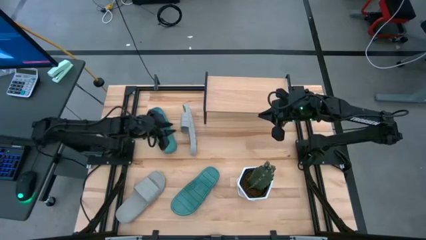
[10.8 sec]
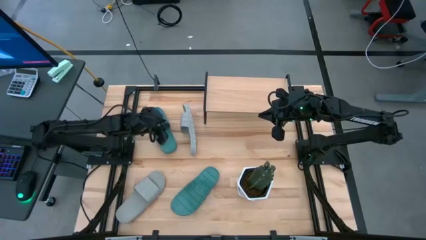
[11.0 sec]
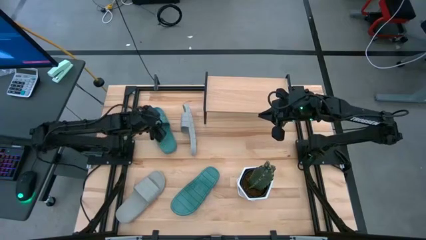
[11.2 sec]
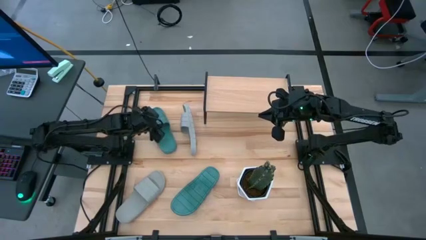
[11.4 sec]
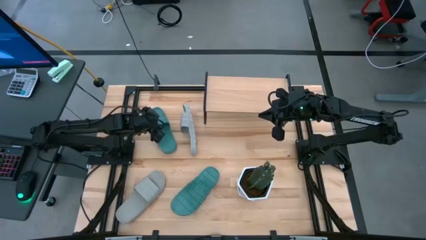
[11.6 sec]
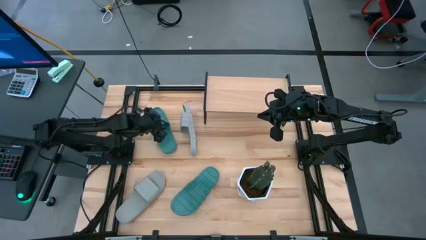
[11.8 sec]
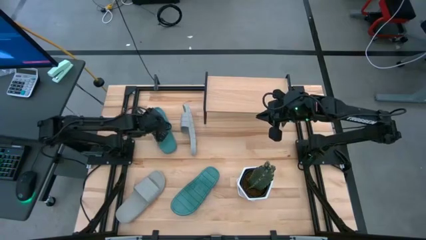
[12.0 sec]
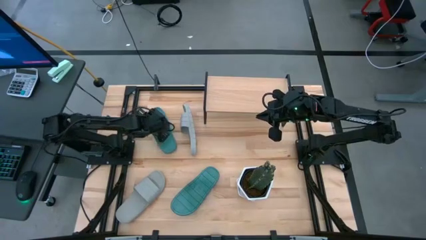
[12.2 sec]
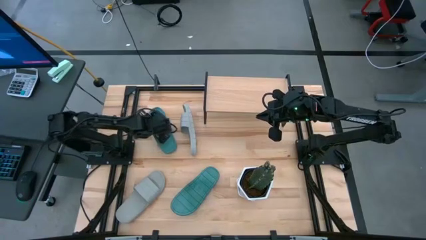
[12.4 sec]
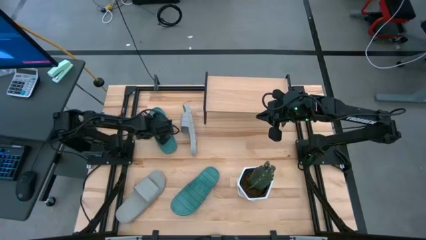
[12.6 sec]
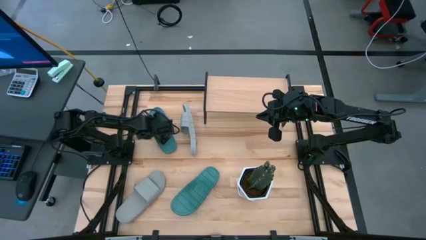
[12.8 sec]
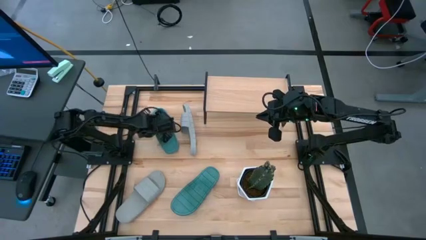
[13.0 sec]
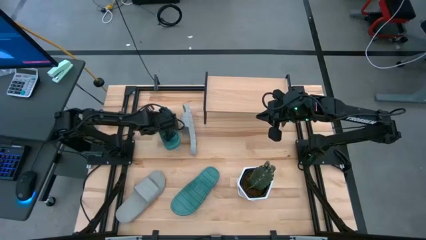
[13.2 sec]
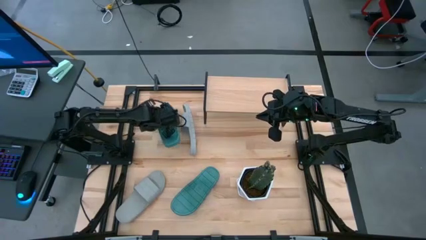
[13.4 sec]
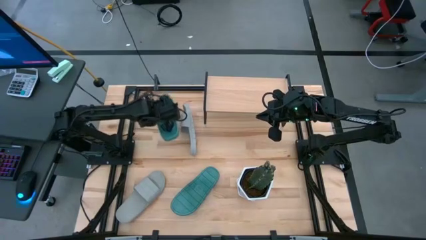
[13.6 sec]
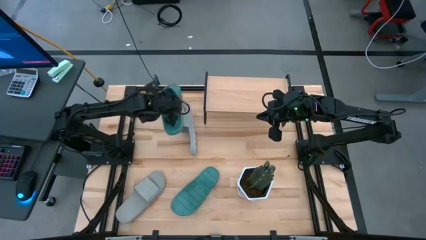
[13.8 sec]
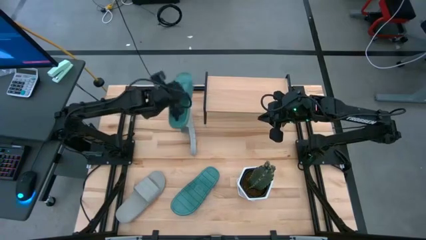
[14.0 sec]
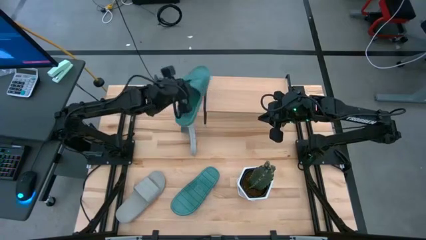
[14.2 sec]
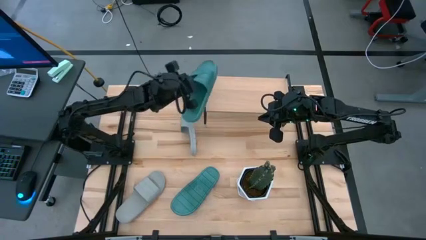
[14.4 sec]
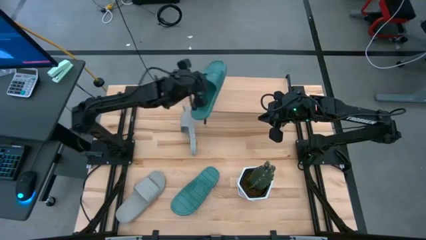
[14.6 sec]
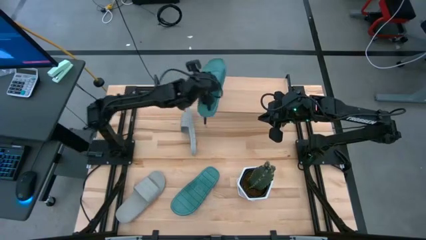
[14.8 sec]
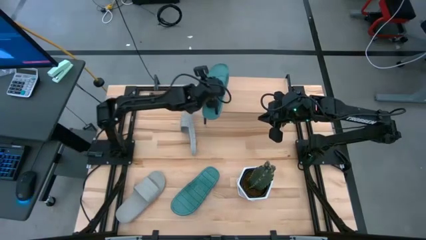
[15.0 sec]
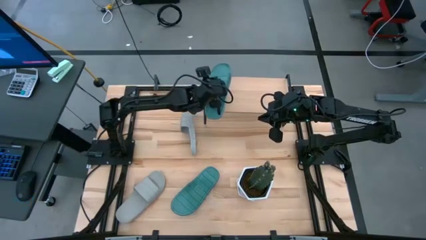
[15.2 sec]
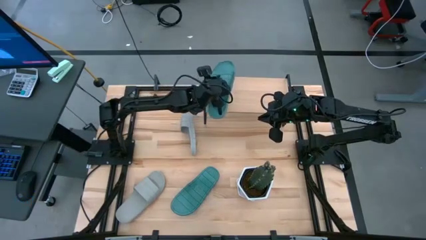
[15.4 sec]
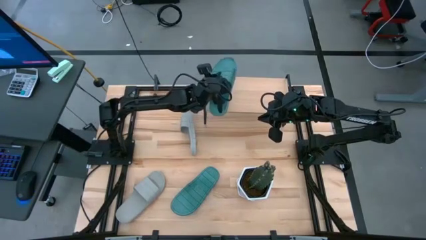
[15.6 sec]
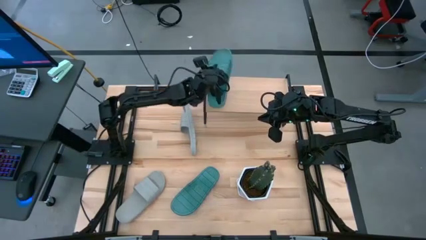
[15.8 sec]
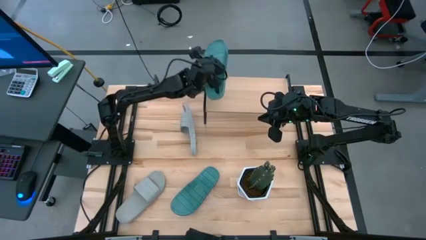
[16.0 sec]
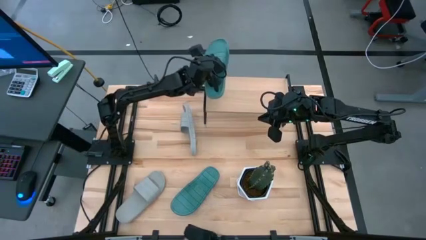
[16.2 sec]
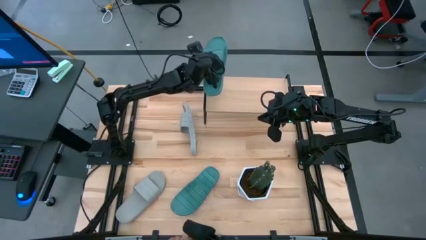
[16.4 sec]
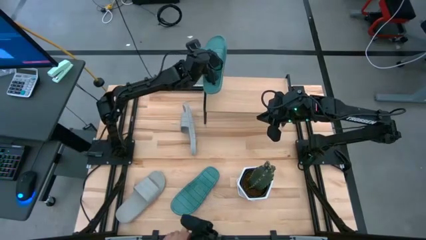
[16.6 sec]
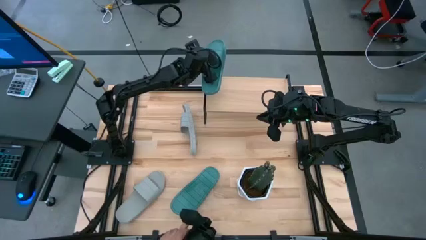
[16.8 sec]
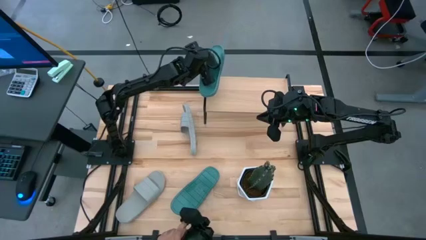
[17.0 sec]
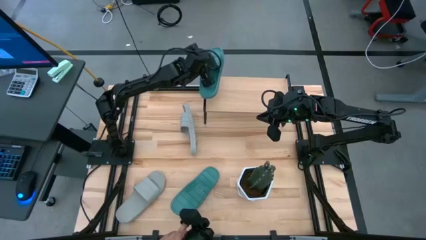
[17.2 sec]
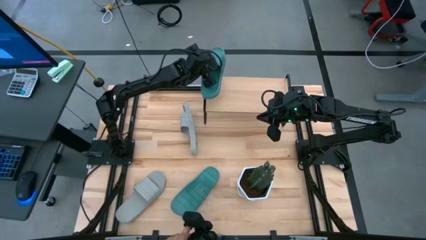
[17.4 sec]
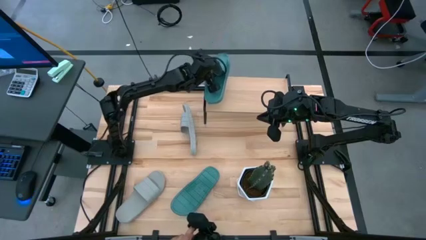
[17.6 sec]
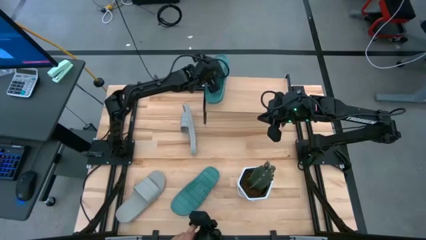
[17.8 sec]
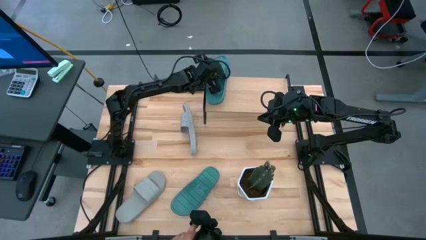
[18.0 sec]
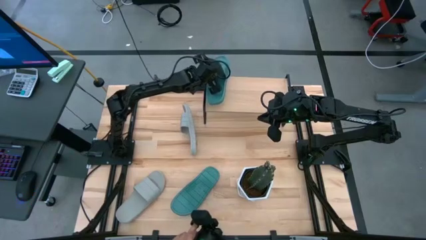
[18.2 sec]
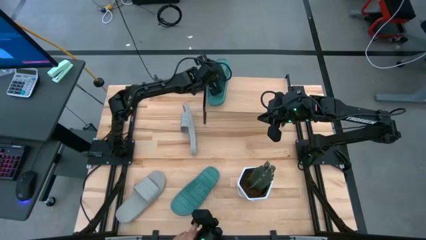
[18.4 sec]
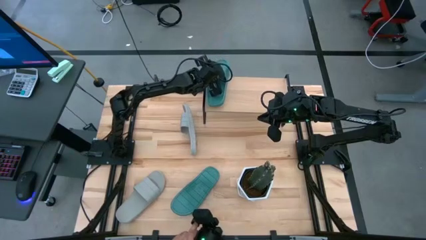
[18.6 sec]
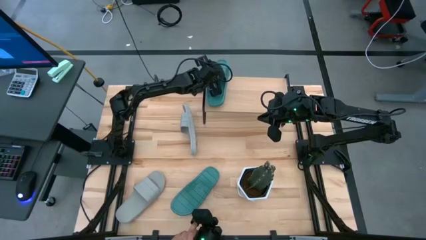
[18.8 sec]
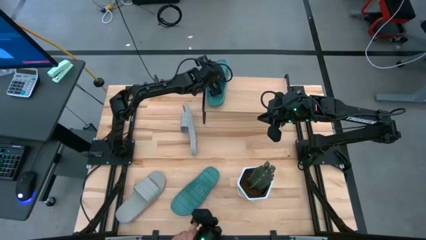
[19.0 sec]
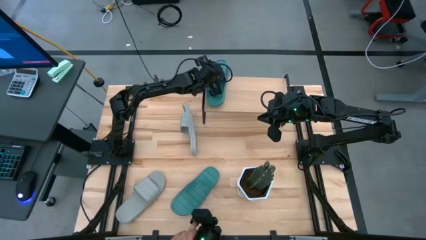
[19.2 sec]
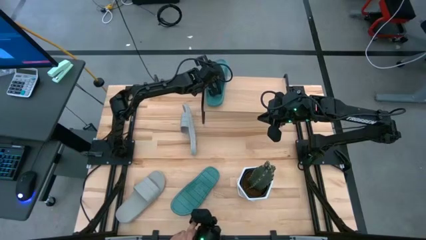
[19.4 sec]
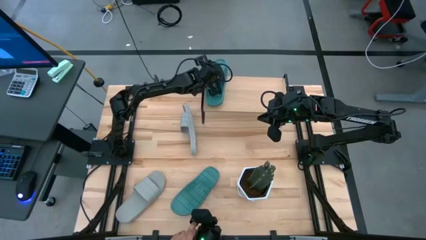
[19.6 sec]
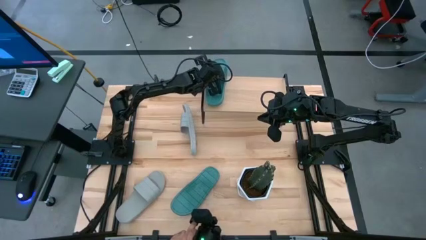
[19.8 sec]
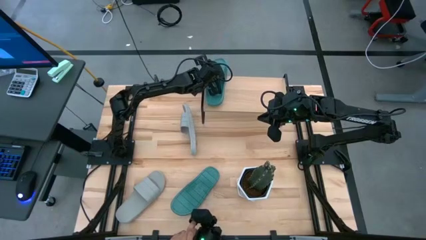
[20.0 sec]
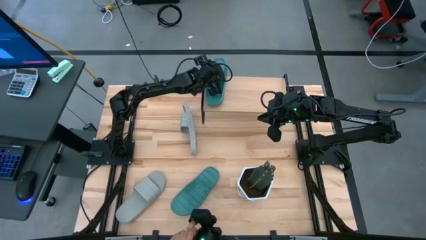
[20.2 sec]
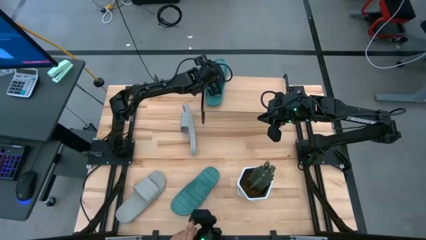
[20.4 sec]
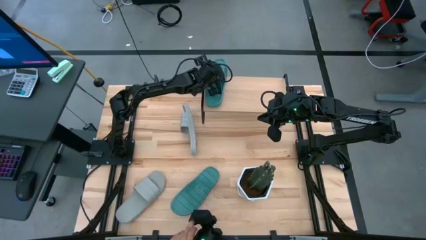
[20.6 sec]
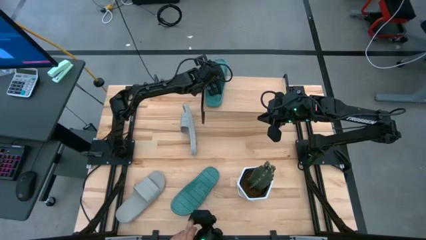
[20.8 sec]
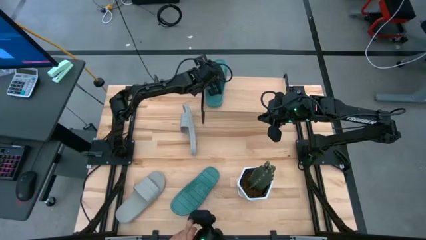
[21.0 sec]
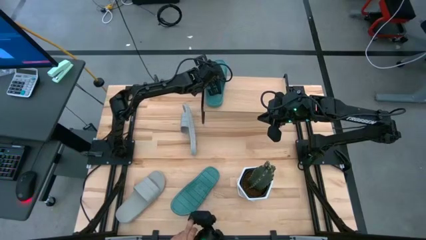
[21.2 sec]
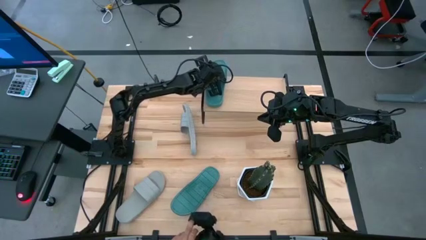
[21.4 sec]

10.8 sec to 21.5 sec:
Task: Pick and place slides into the shelf
Put the top green slides on the shelf
